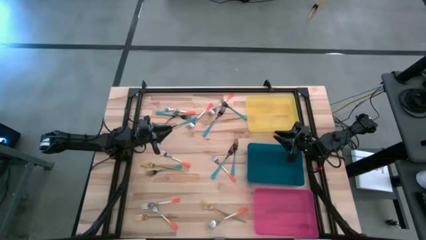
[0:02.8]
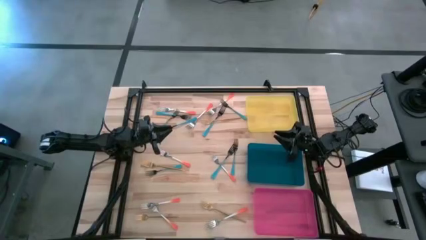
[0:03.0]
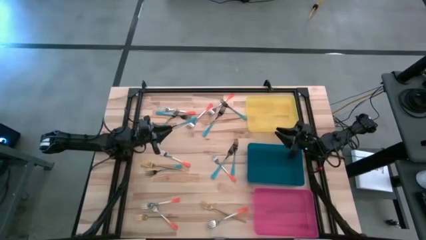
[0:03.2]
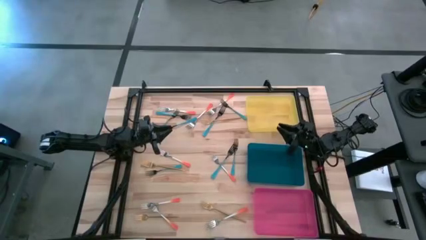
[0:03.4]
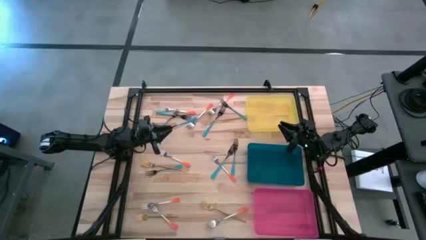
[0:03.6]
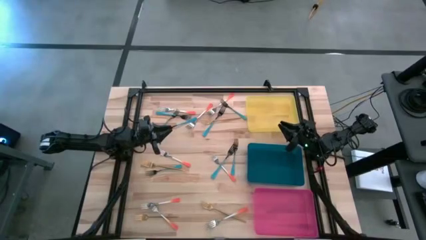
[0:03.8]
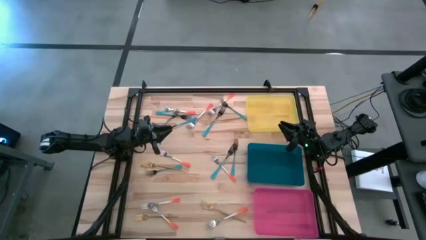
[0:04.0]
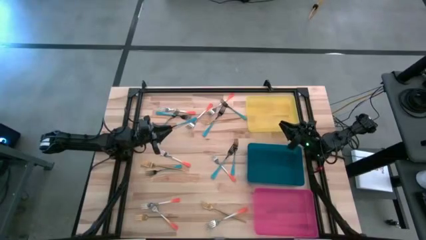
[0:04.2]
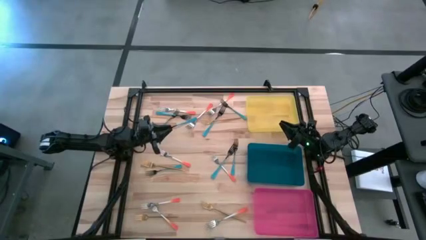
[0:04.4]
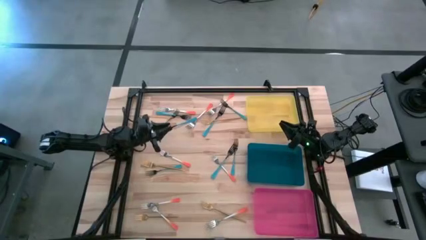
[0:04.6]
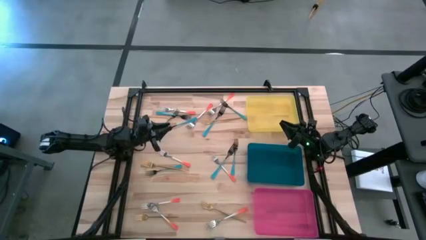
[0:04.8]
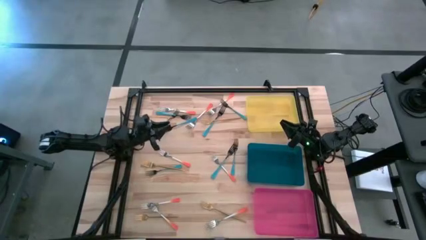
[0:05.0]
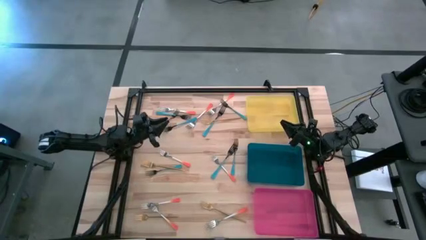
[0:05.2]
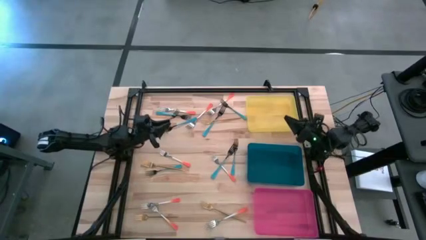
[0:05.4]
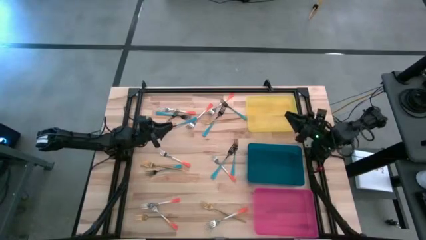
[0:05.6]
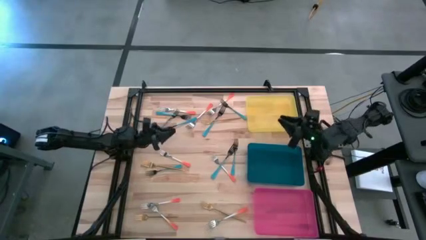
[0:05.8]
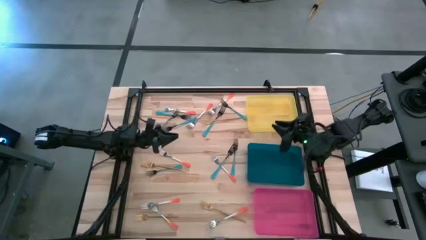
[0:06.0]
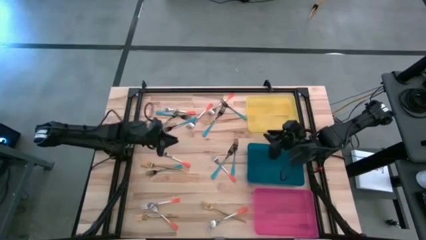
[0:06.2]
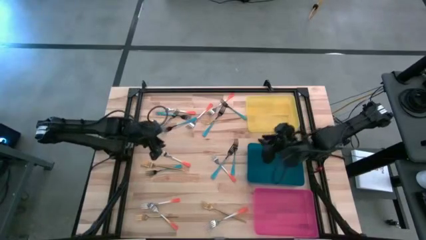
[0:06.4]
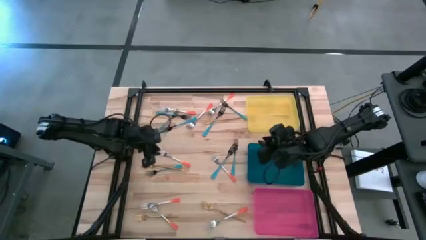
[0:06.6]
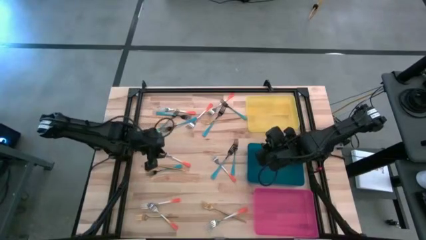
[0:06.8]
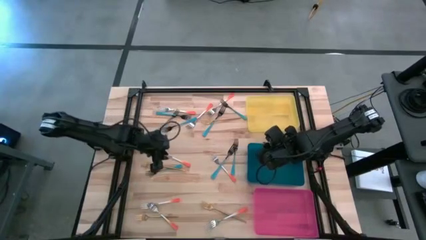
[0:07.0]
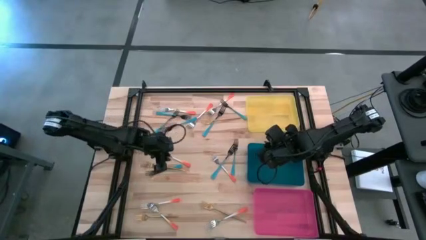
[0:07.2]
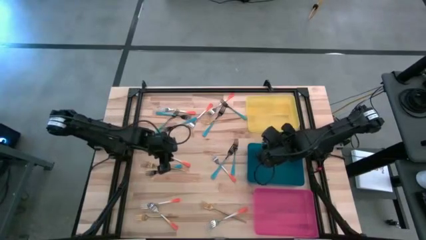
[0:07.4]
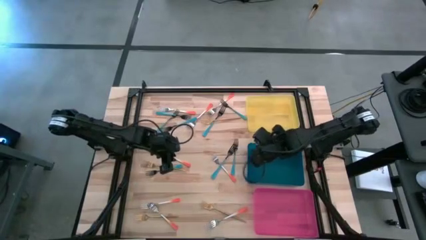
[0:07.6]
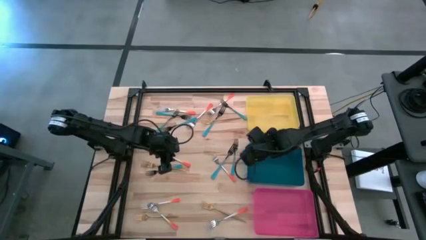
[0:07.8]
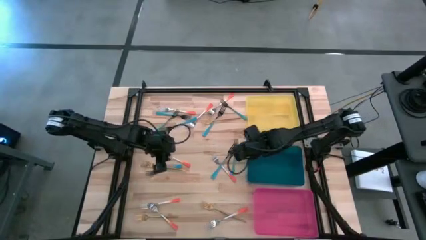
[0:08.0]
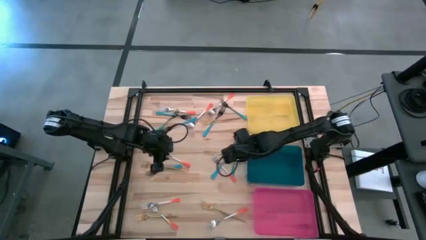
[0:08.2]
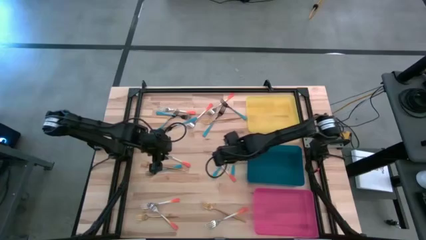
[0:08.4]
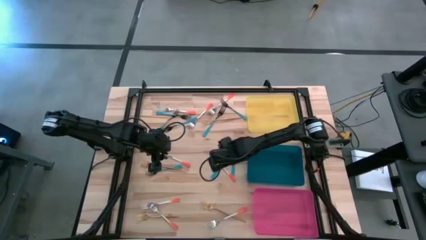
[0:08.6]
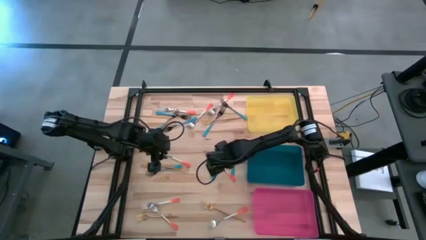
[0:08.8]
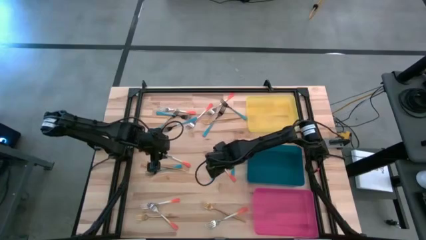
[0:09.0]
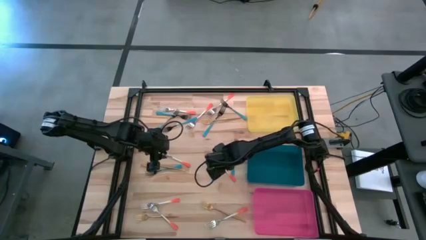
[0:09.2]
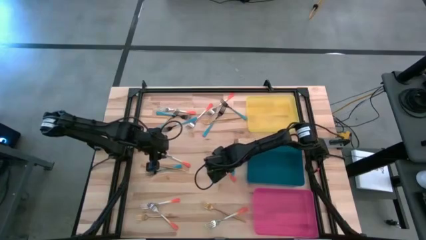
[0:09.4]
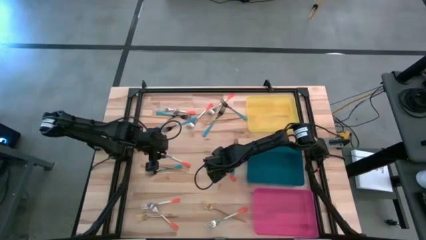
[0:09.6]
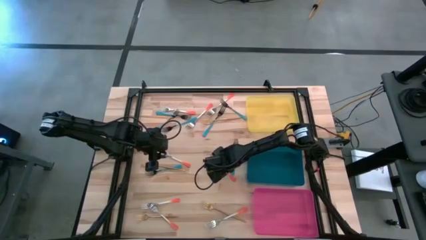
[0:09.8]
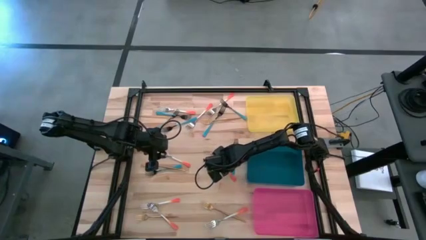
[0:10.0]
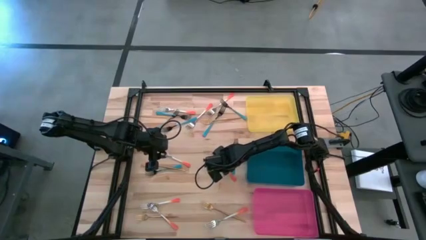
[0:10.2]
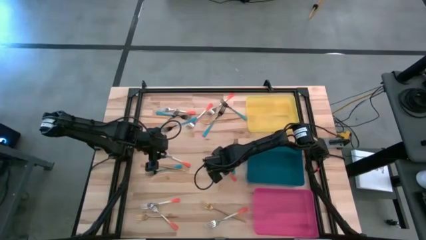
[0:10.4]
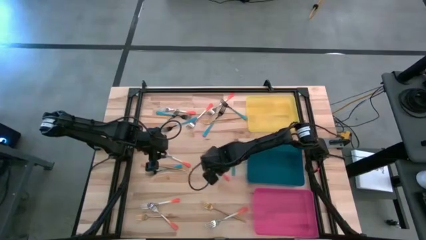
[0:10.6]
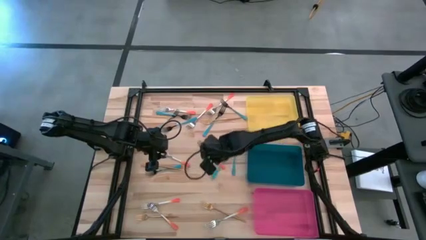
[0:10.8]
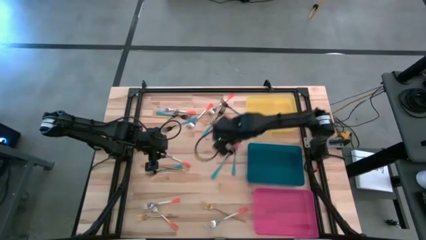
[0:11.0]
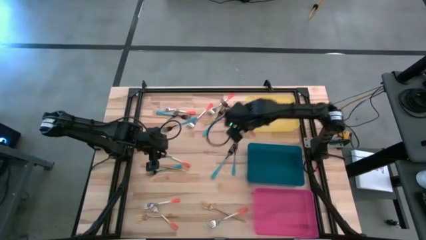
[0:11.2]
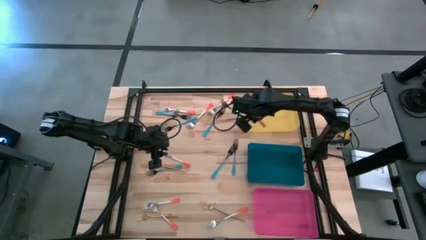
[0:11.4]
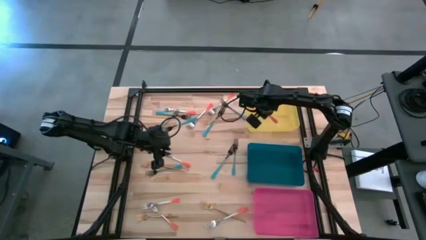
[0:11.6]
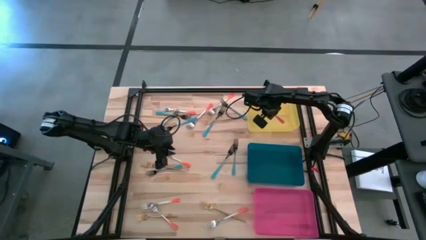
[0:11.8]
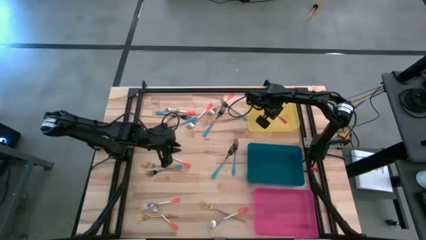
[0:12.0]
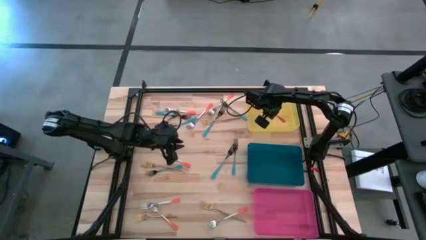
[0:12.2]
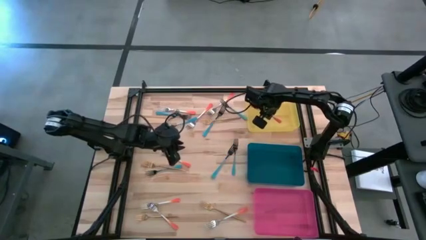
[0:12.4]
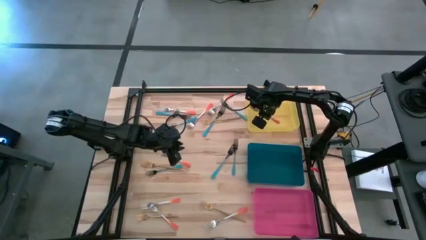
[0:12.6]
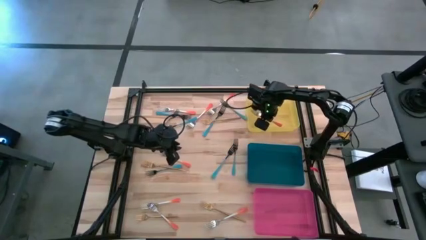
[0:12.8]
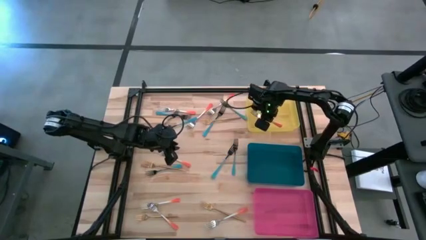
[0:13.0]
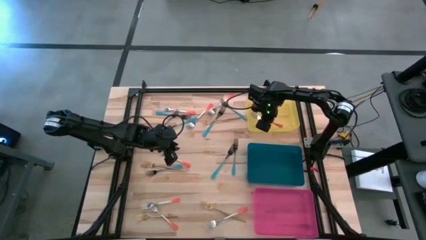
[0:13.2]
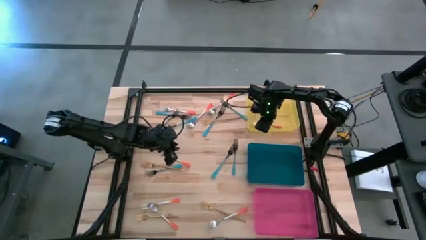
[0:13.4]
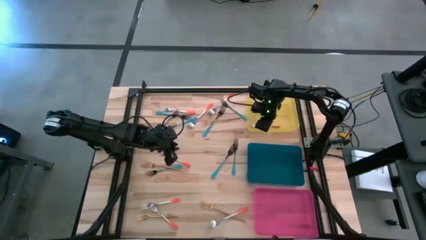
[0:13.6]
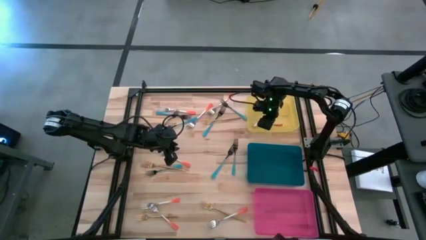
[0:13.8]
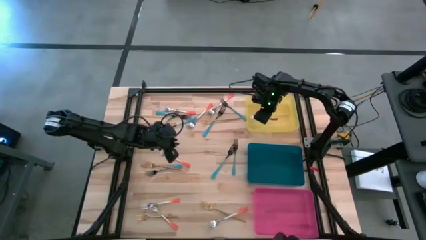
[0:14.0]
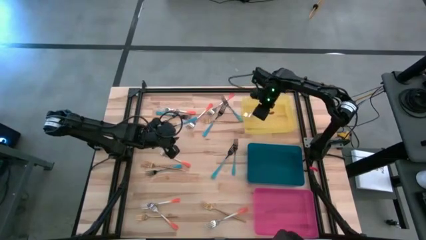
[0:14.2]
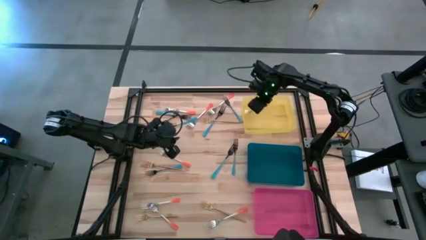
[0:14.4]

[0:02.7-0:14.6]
Task: Sort silverware by color (type)
Put the orange fork into the yellow bin

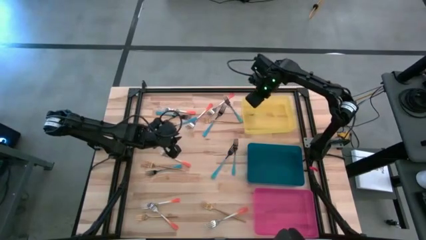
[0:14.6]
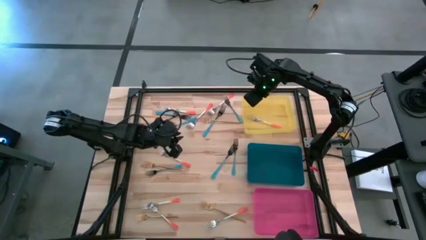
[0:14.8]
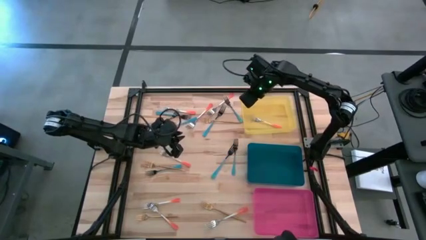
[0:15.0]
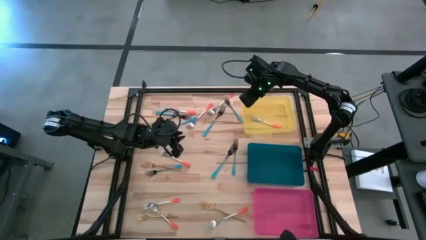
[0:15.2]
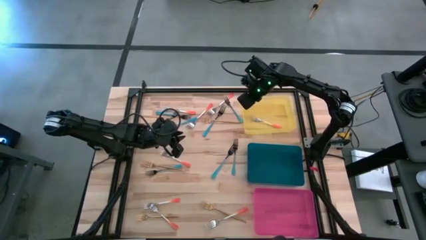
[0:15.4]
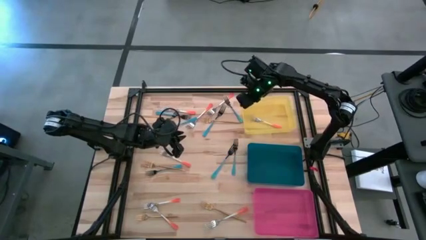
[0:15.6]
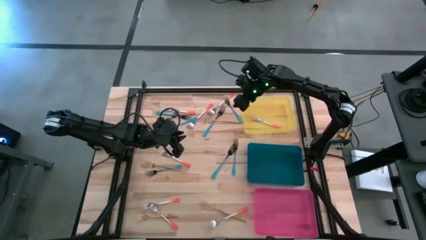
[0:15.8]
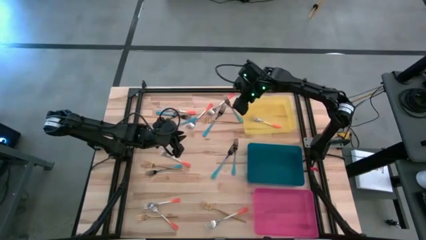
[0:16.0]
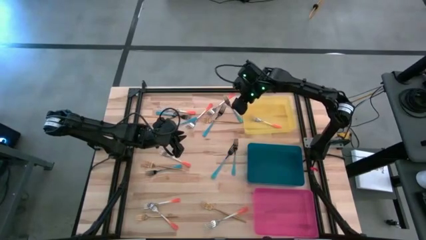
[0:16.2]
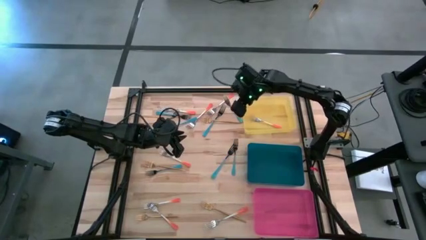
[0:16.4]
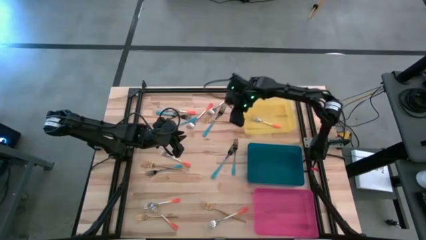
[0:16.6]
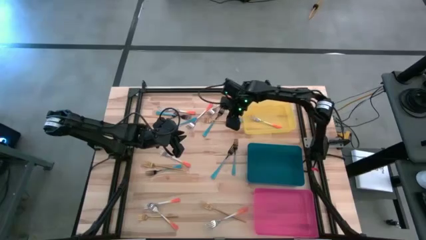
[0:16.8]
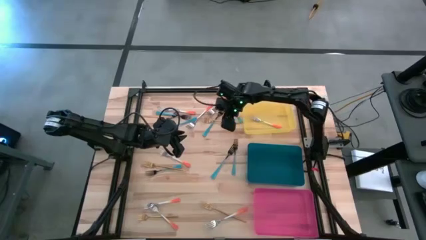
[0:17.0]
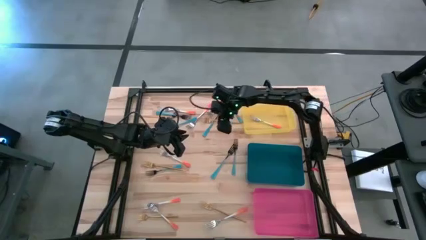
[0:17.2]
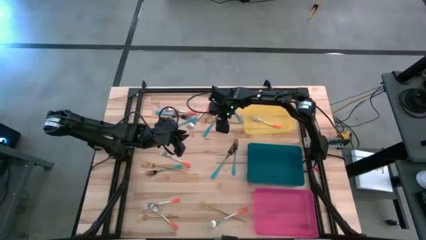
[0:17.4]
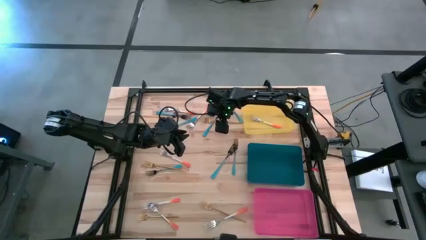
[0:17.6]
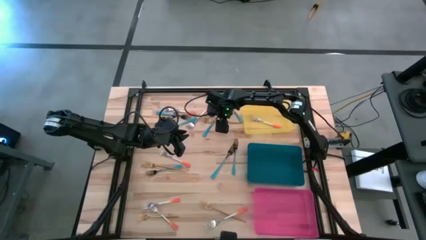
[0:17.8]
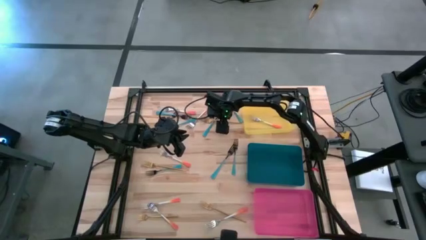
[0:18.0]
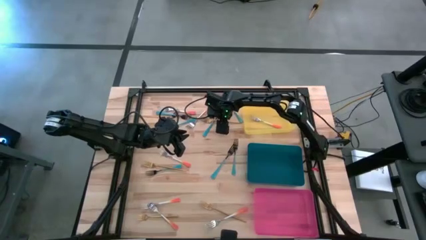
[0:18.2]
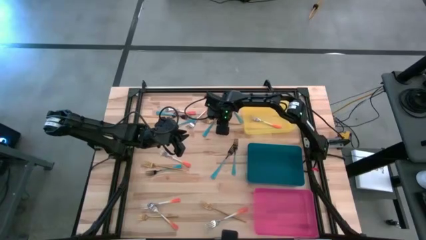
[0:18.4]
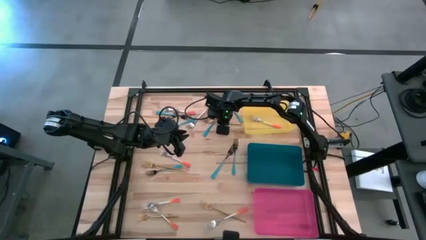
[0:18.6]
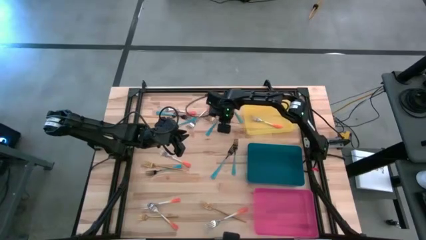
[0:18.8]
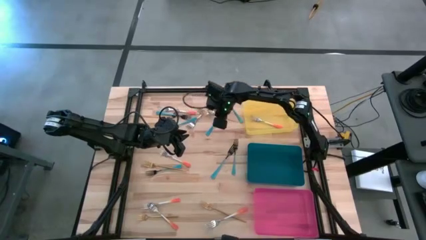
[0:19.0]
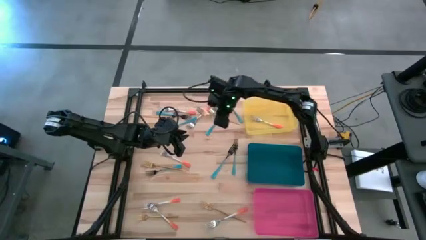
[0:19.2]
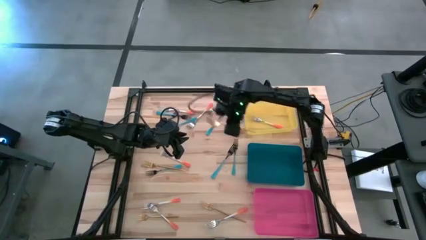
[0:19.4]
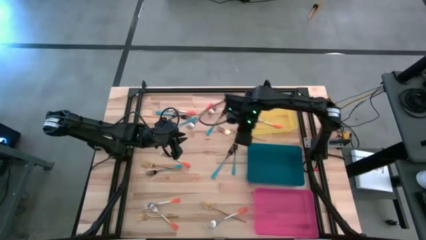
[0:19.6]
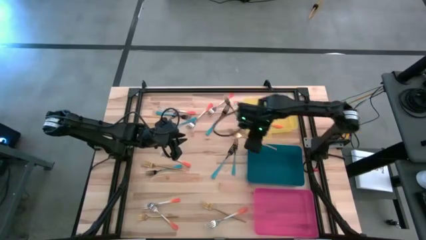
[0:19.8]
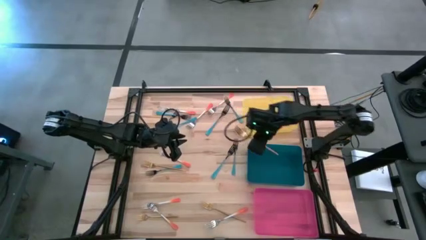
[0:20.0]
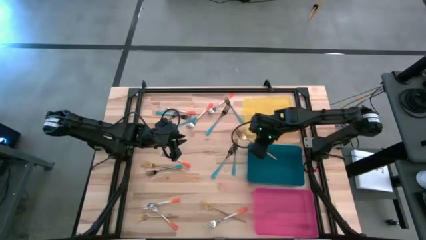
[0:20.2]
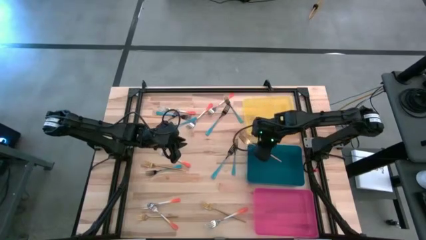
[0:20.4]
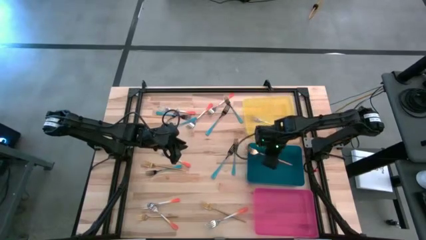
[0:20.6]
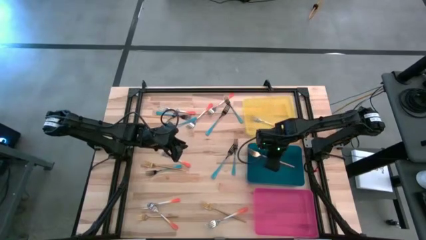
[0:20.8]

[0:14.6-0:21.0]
Put the gold fork into the blue bin
